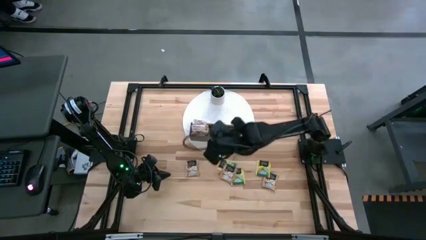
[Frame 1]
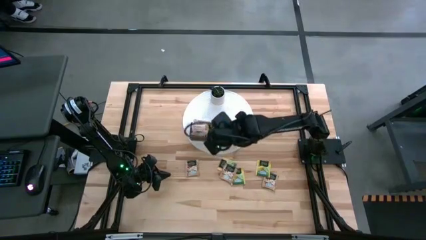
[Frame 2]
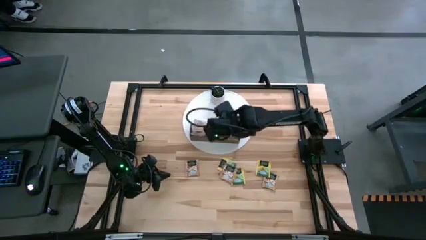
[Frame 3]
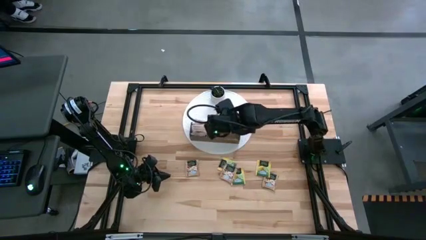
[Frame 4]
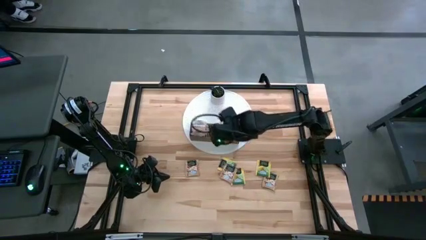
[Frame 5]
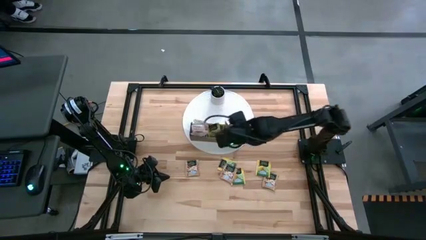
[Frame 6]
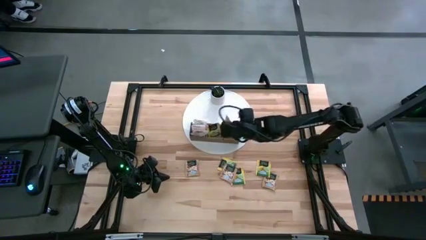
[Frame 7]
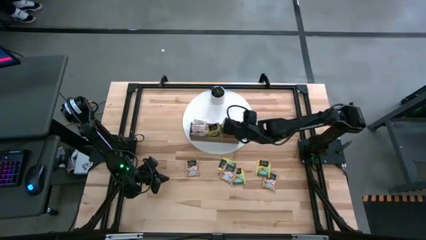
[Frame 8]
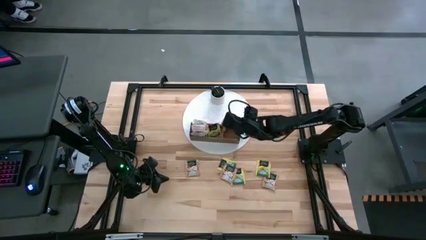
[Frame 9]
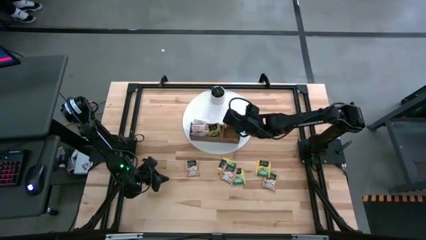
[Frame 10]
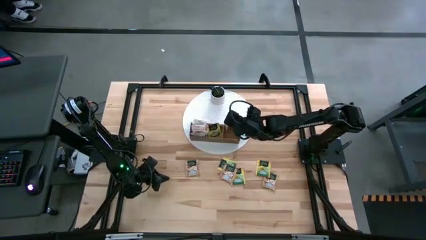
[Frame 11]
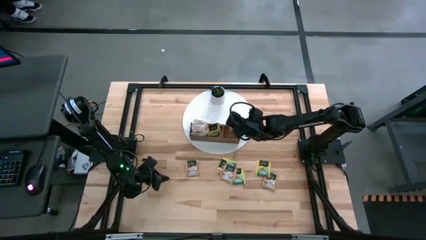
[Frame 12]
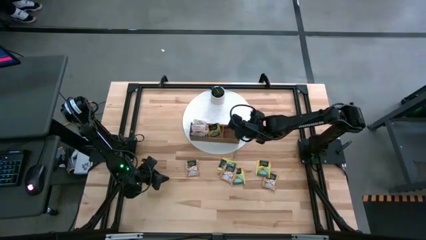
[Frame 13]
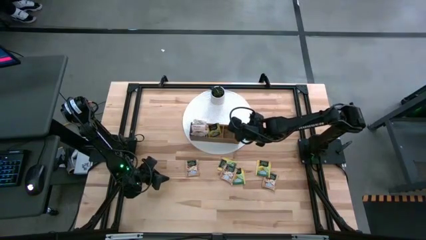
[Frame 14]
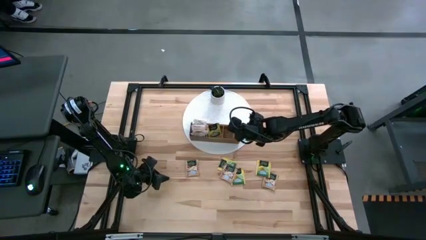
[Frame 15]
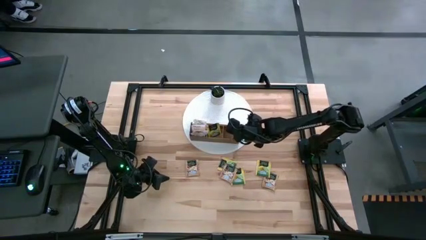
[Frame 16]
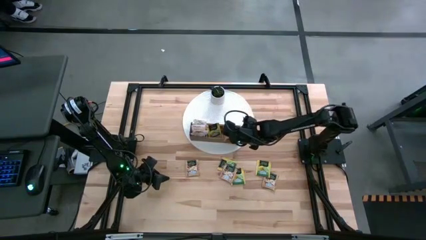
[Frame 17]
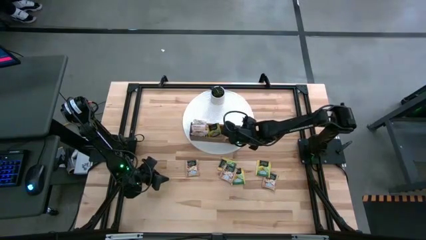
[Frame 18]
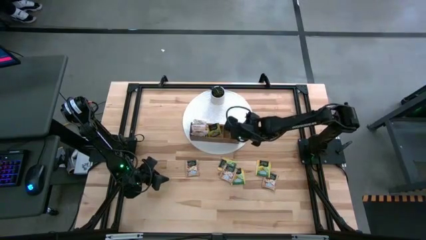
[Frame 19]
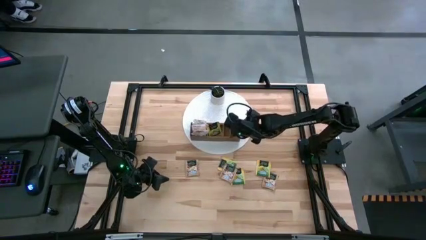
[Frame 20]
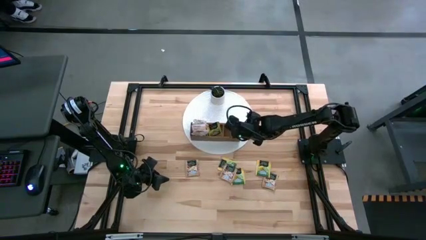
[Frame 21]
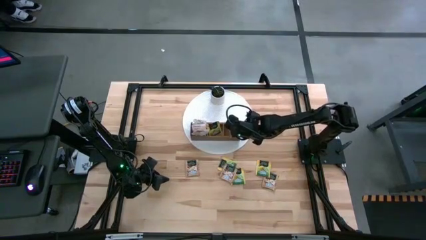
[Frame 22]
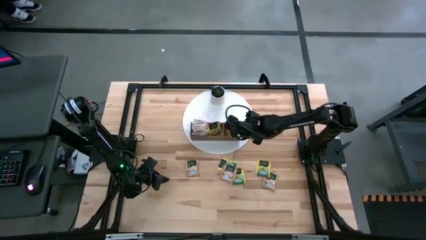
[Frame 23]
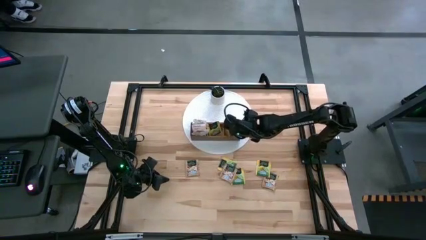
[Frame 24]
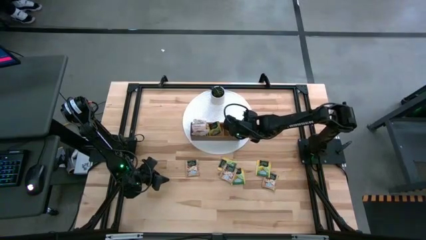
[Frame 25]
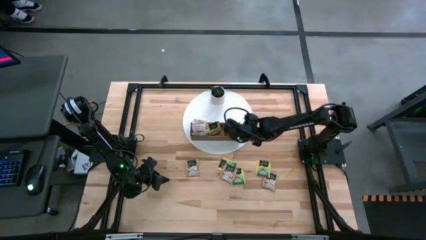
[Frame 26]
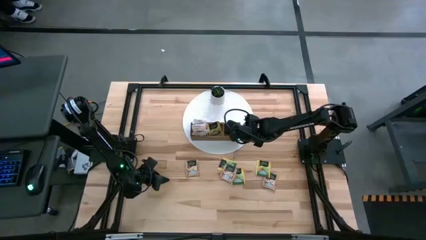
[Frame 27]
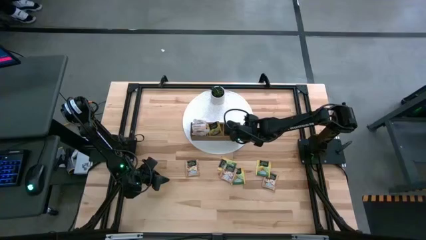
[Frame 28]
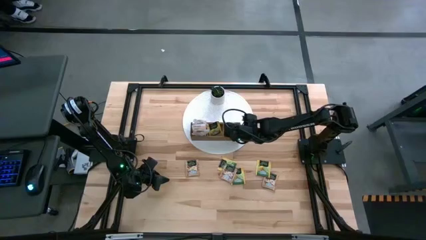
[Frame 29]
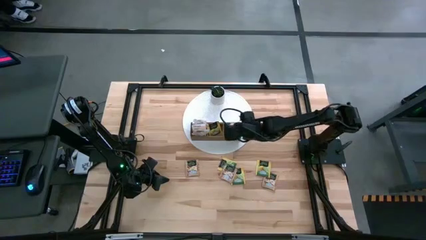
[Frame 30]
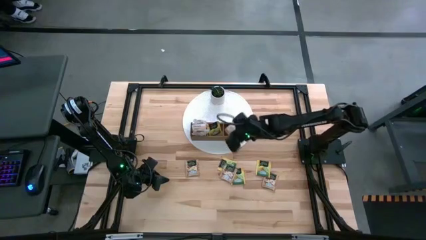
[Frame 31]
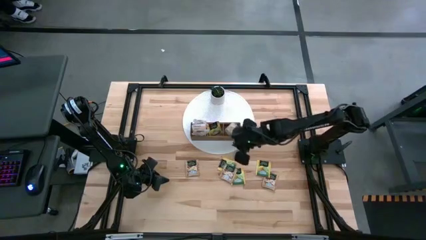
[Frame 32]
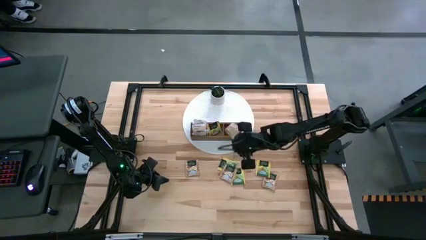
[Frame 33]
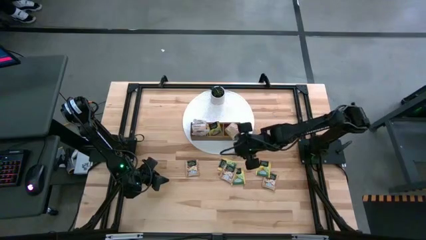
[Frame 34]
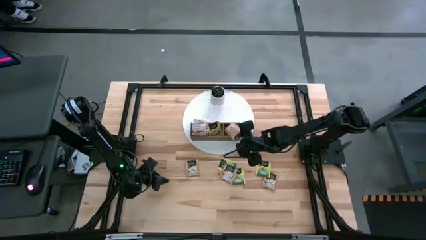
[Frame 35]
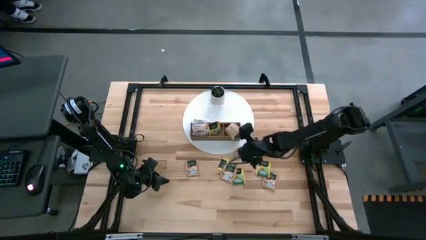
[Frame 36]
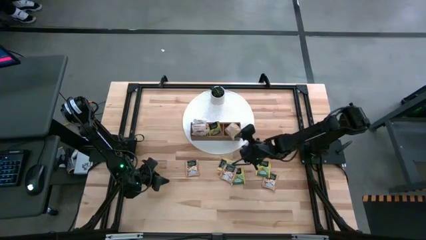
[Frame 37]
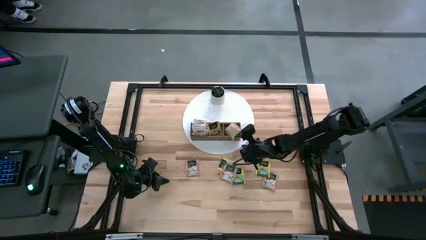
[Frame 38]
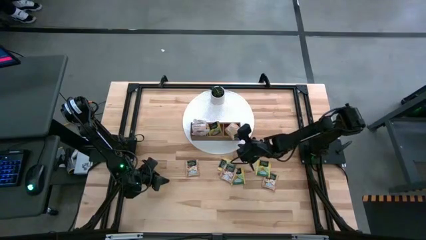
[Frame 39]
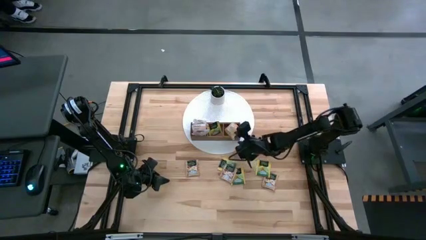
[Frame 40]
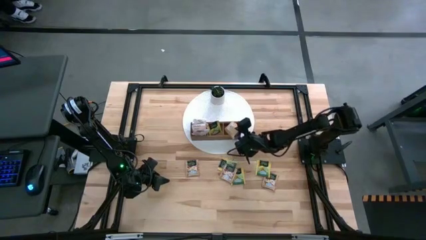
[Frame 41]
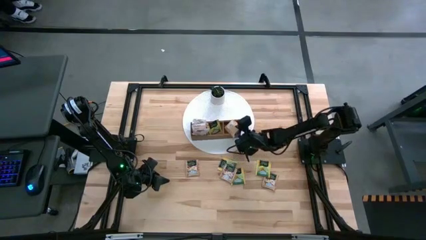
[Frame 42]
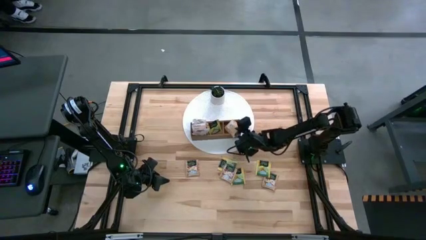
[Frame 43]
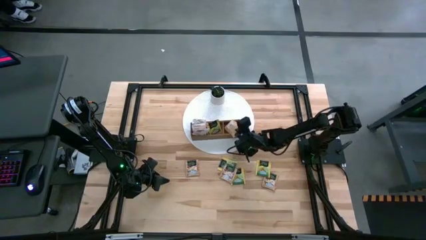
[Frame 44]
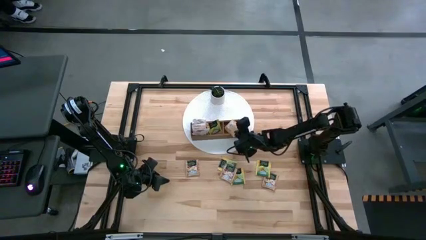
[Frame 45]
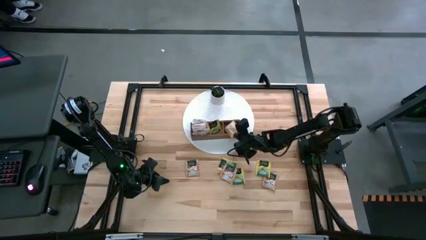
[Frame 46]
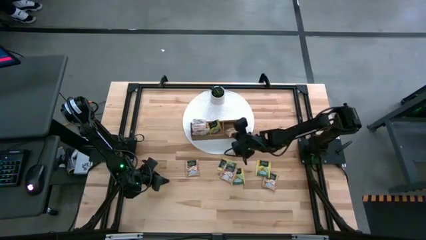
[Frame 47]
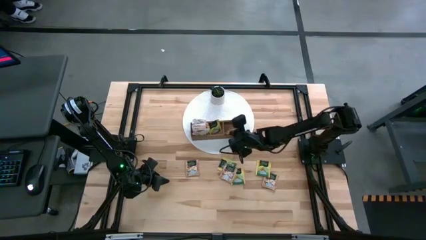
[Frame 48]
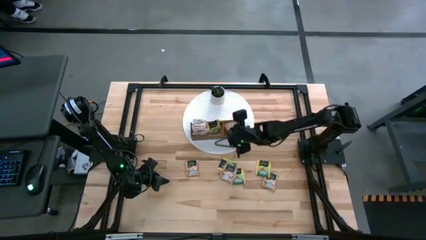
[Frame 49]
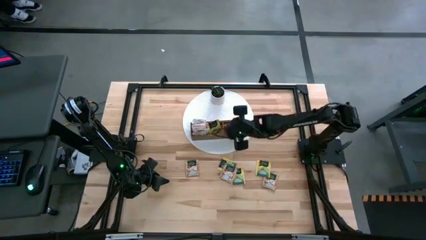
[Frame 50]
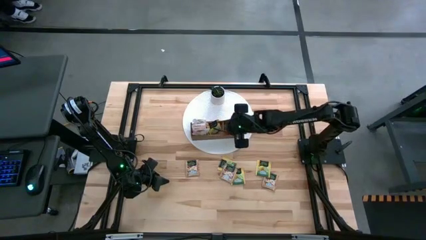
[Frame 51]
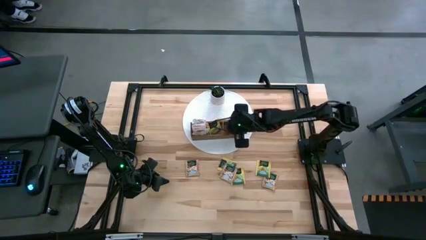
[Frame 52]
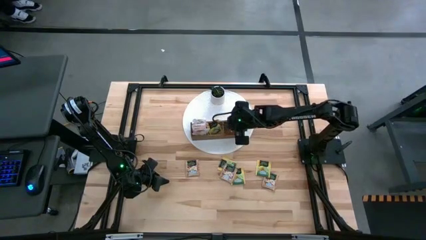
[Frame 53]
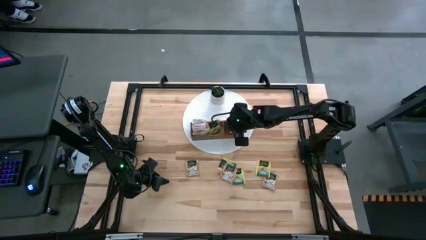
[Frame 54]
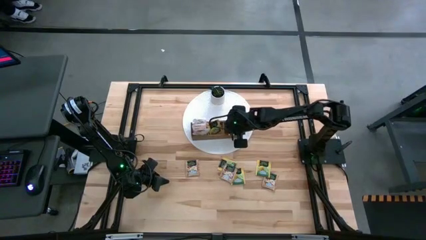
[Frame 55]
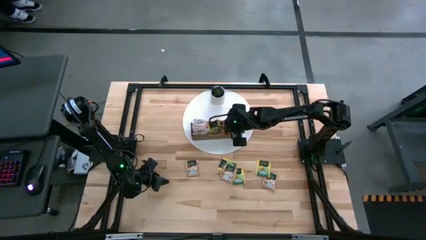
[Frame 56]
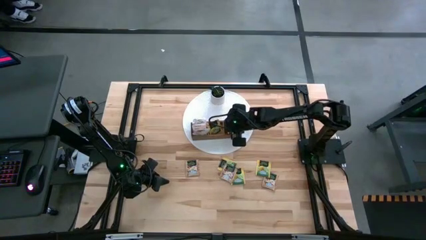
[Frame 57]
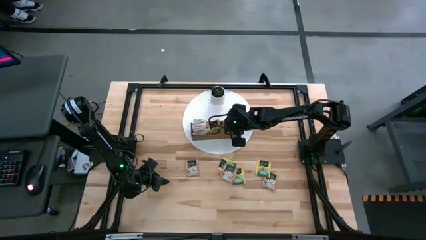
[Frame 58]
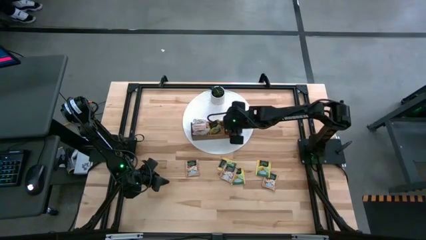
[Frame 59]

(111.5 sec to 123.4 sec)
Task: Pick & Place Tea
Put the brown tea bag into the right section of the wooden organizer

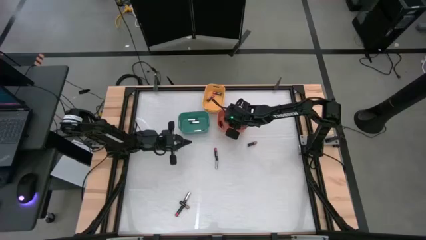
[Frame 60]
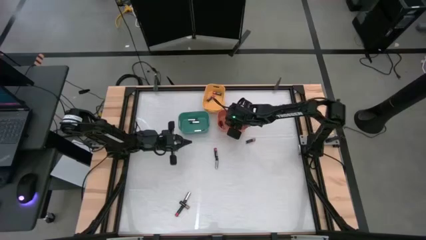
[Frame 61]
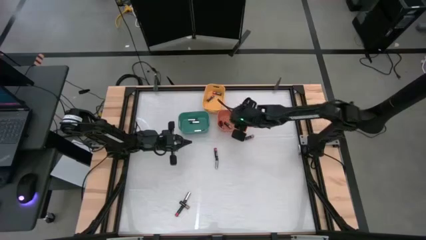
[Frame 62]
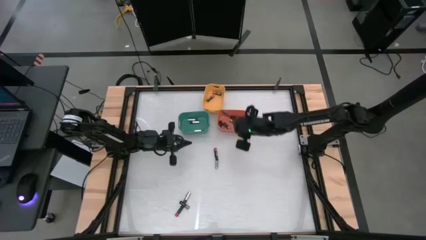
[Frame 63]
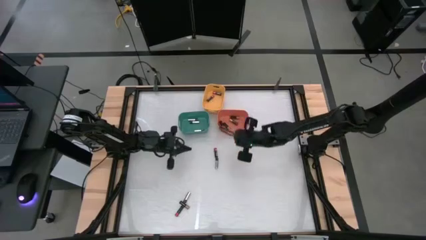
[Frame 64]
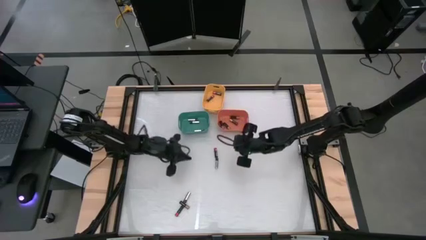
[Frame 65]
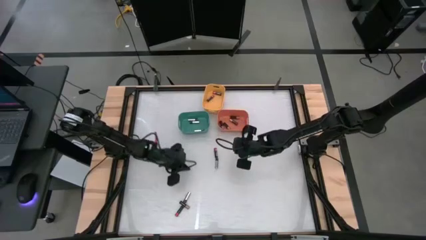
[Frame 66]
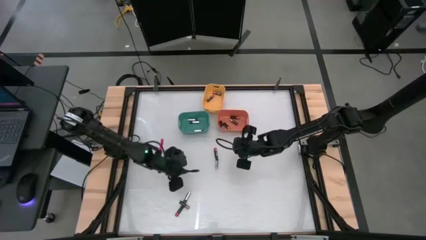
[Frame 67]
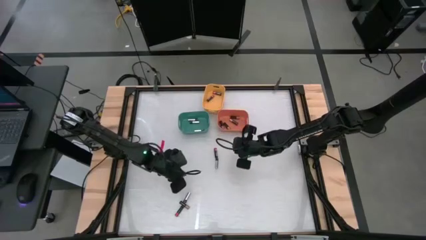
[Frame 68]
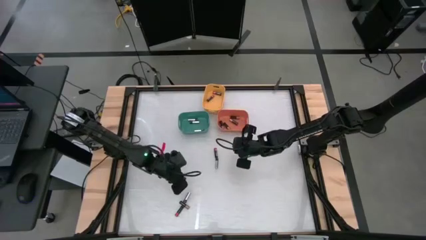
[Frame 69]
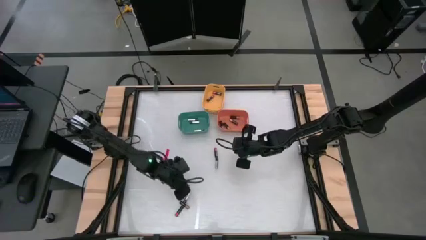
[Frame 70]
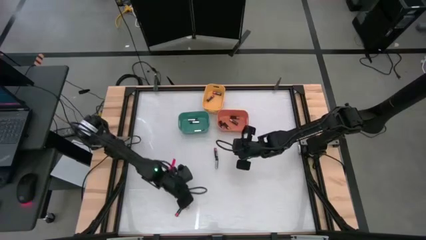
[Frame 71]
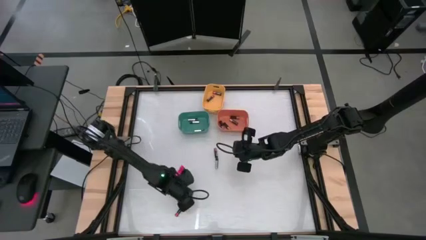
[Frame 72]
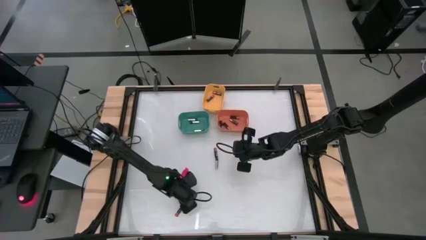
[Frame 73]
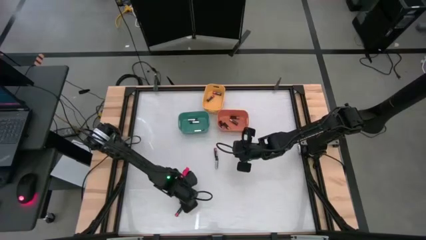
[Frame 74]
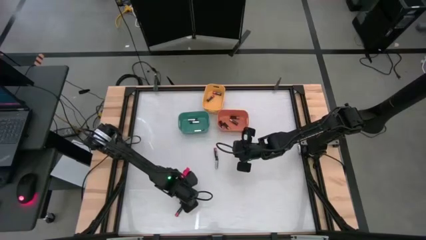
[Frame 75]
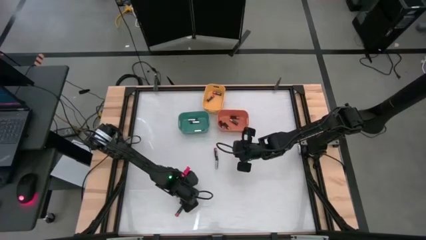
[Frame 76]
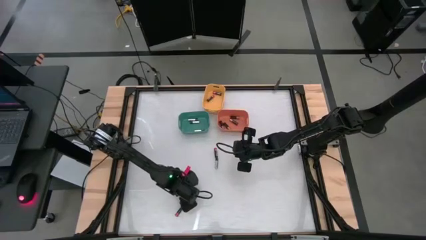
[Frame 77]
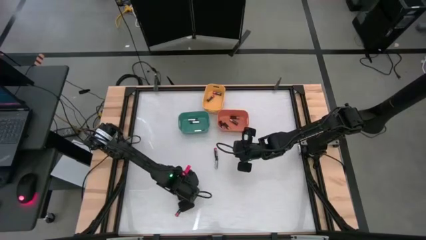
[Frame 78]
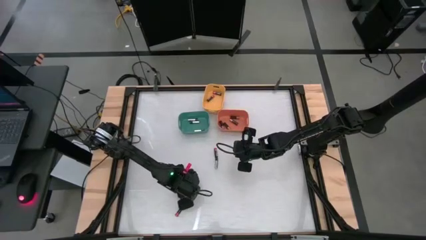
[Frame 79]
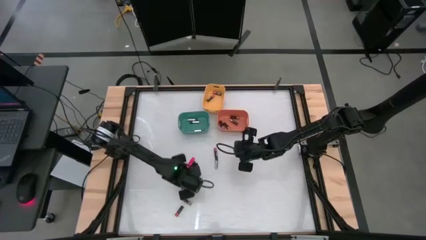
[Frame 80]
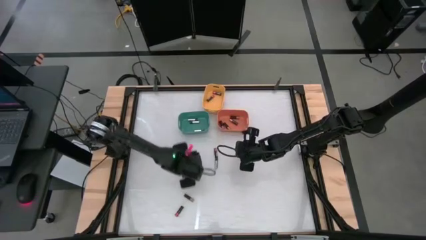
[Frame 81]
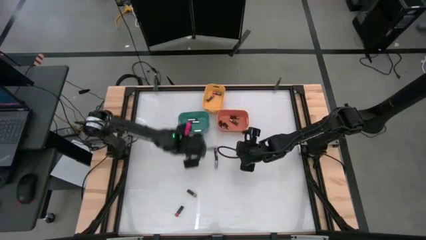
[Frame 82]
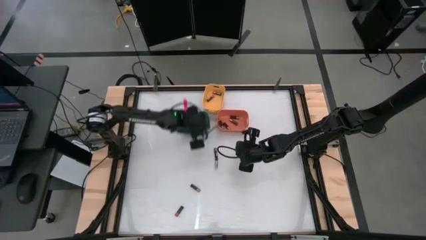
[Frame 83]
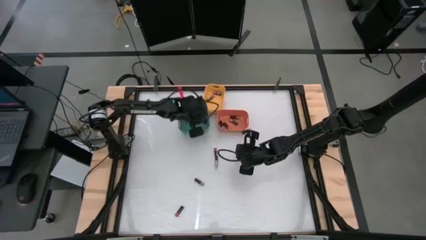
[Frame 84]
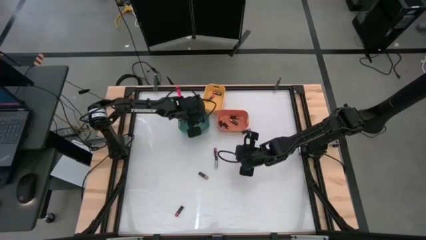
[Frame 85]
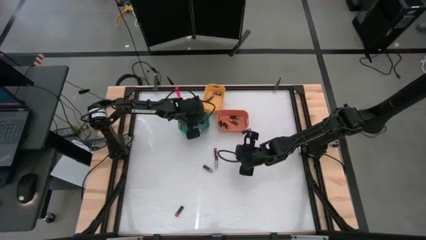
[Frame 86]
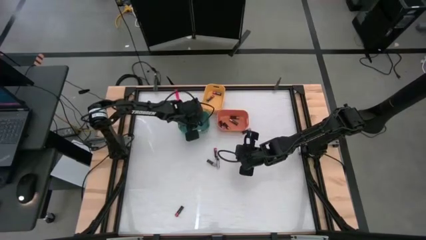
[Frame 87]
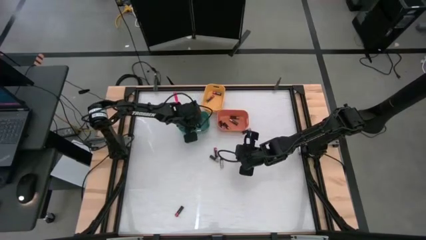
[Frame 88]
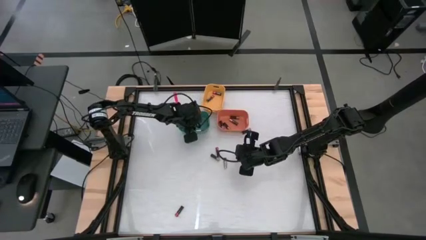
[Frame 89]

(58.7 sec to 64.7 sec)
Task: Sort batteries
Put the silver battery into the green bin
